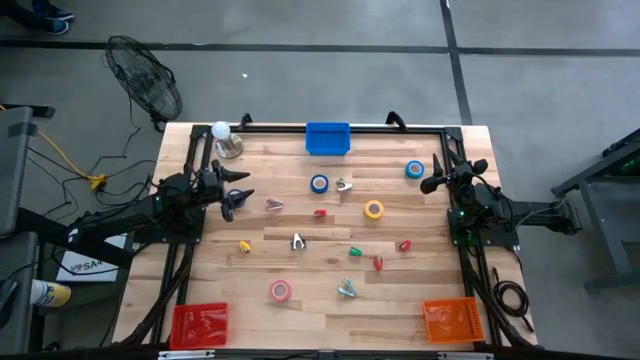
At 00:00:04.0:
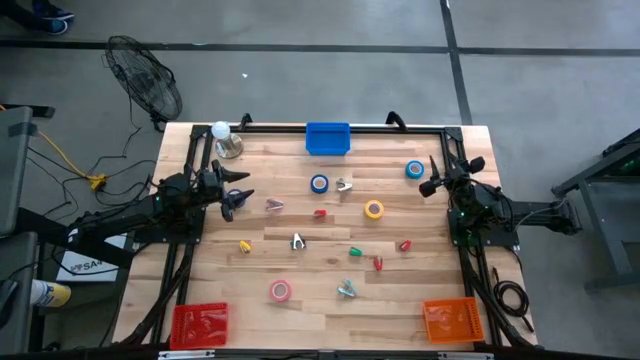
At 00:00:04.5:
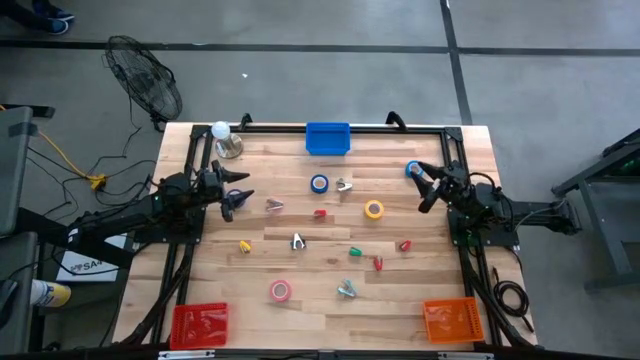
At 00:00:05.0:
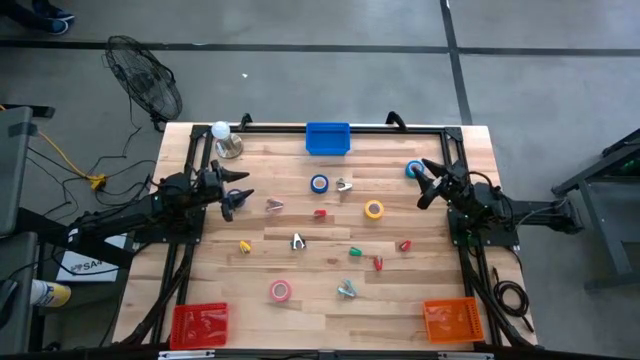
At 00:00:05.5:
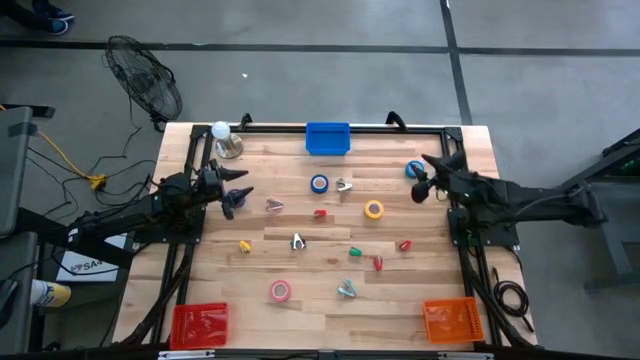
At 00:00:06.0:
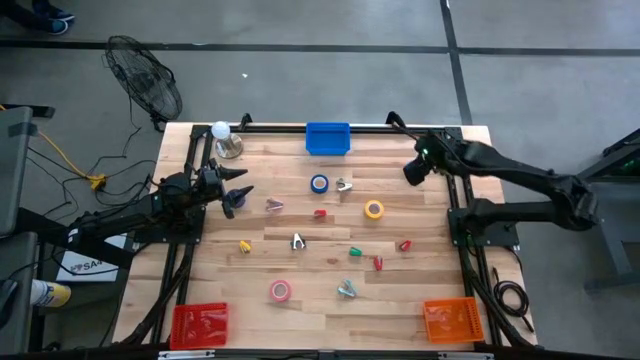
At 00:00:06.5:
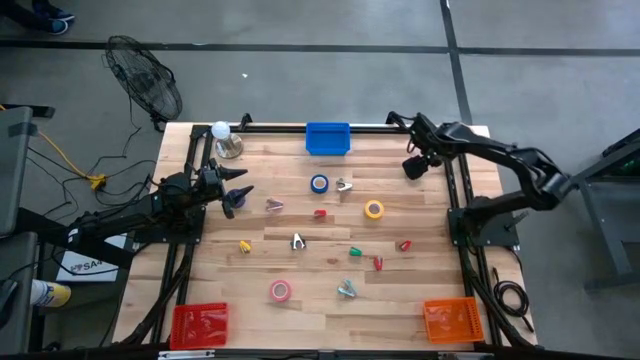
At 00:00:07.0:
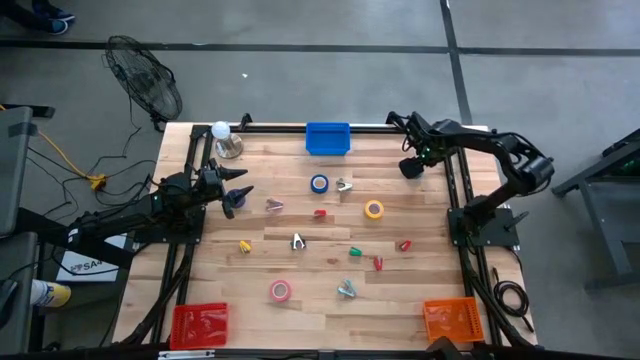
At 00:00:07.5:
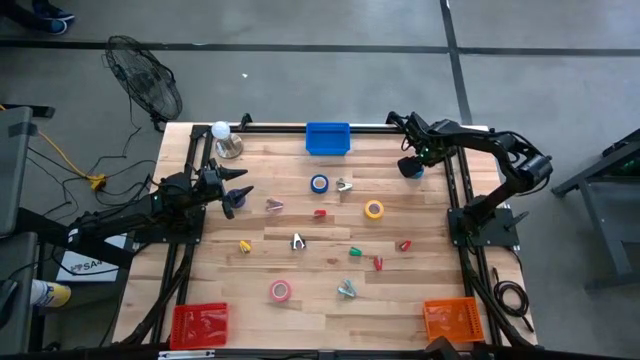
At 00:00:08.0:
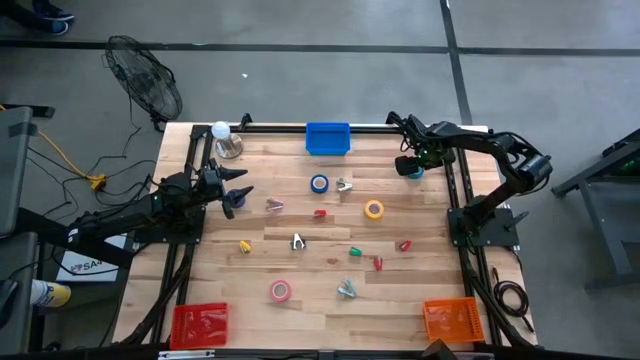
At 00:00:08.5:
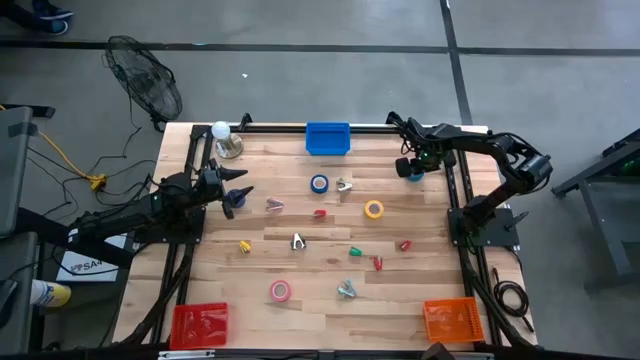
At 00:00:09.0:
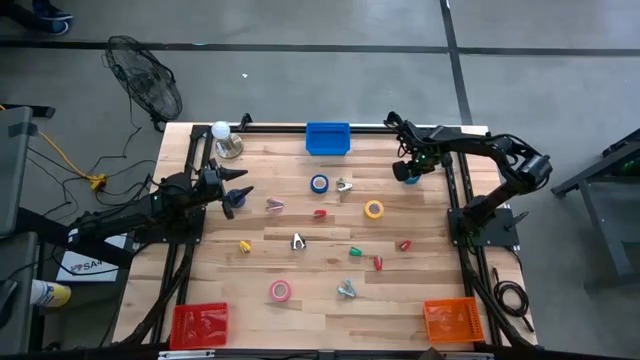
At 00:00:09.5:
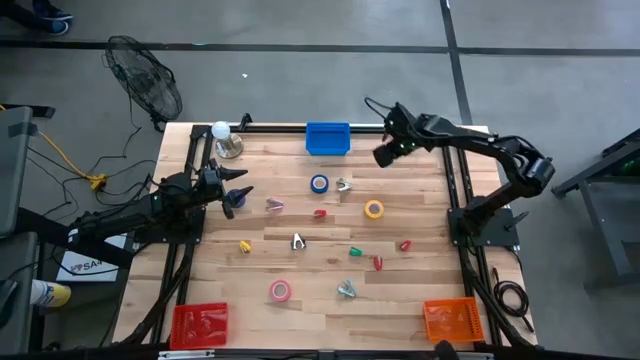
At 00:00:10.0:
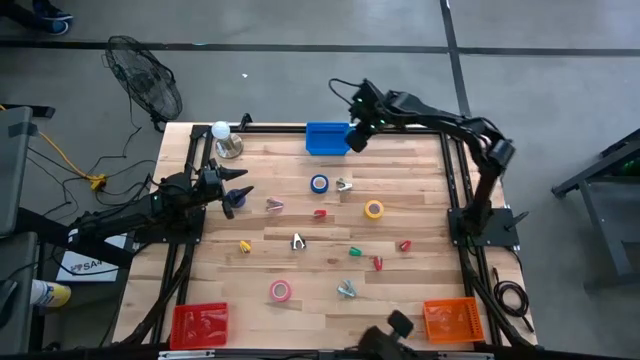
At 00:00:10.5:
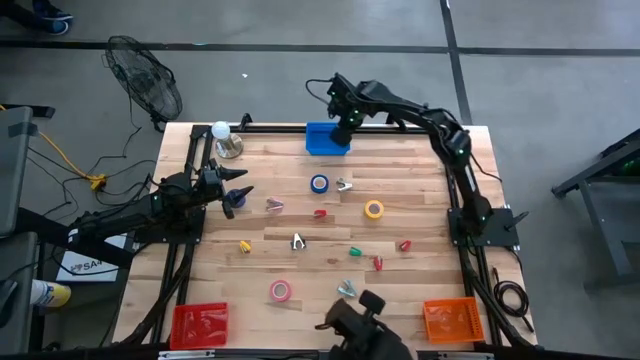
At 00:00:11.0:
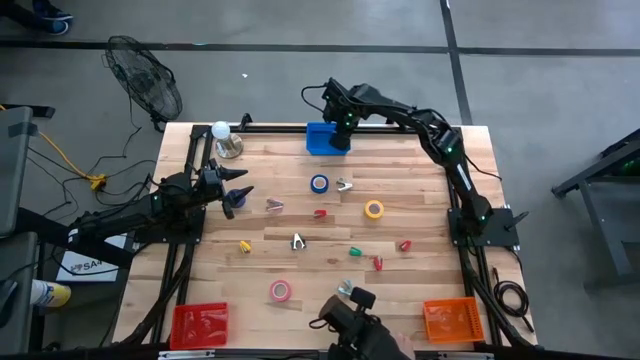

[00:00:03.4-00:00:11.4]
Task: Pick and place Stapler, Stapler remover, tape
Put the right blue tape into the blue bin

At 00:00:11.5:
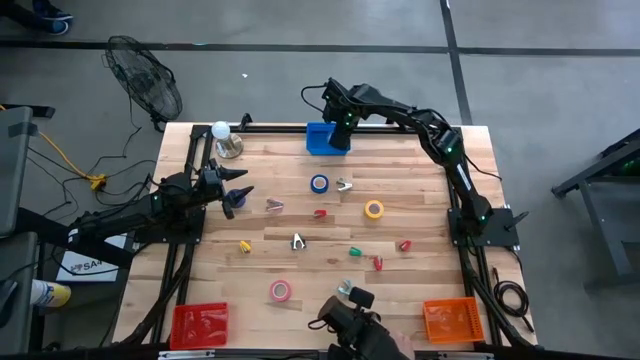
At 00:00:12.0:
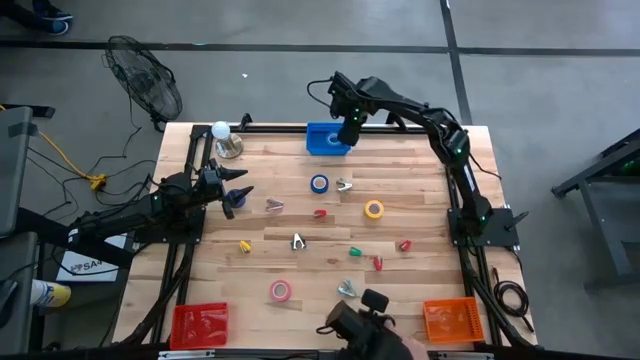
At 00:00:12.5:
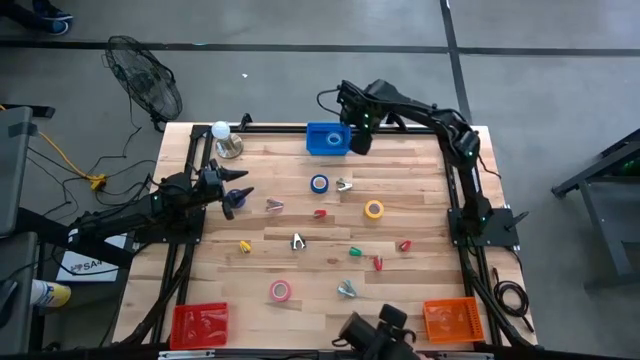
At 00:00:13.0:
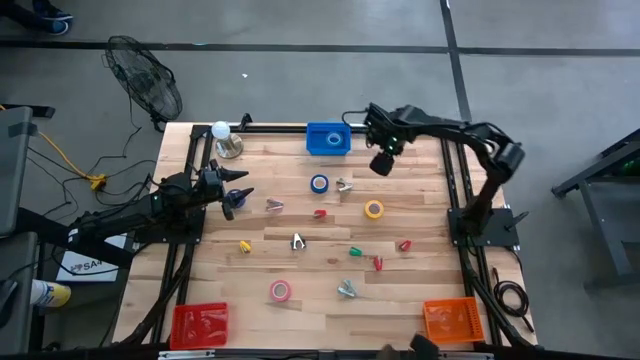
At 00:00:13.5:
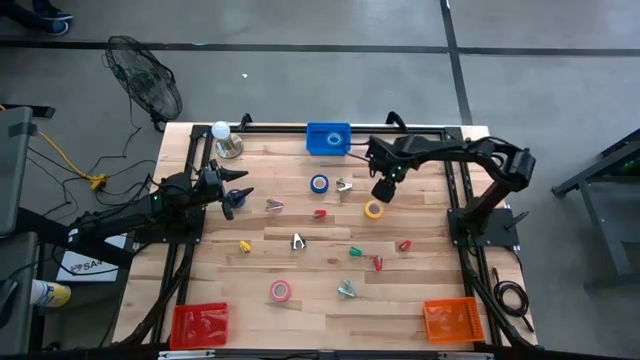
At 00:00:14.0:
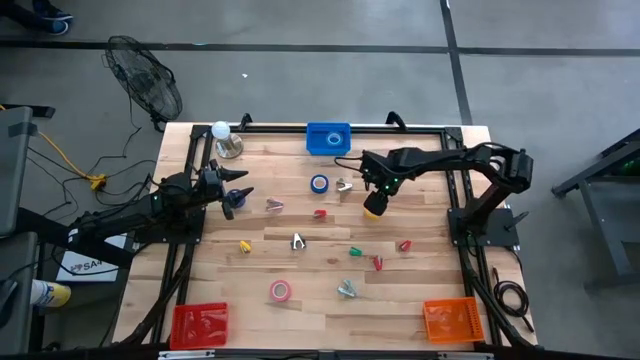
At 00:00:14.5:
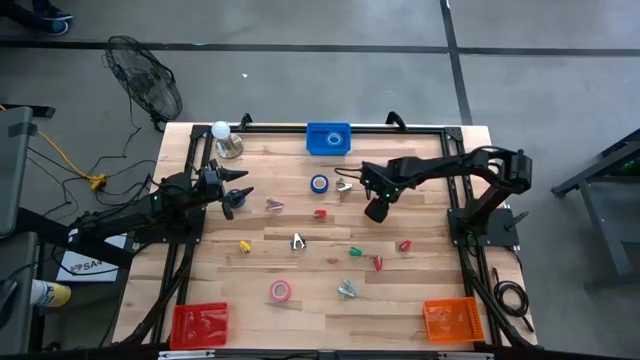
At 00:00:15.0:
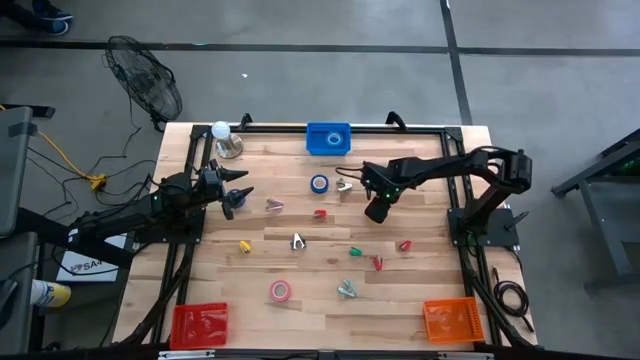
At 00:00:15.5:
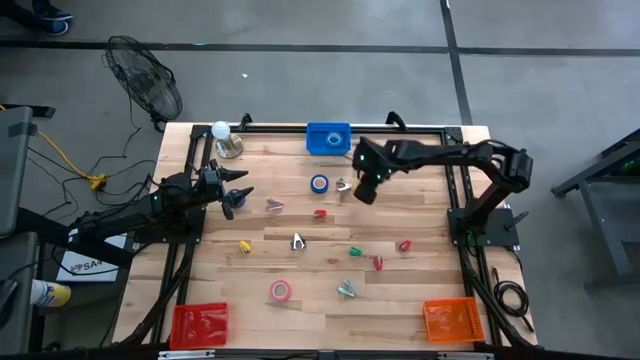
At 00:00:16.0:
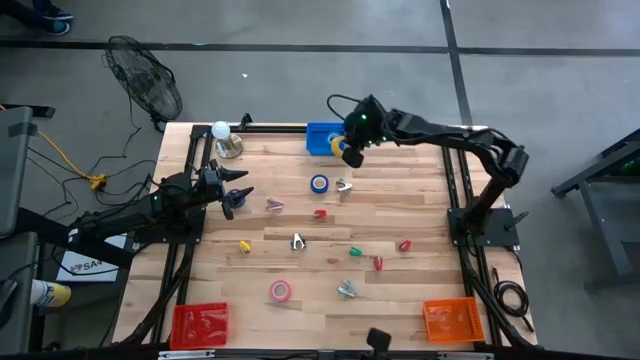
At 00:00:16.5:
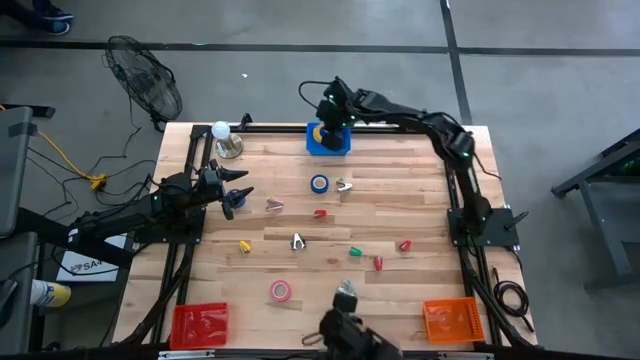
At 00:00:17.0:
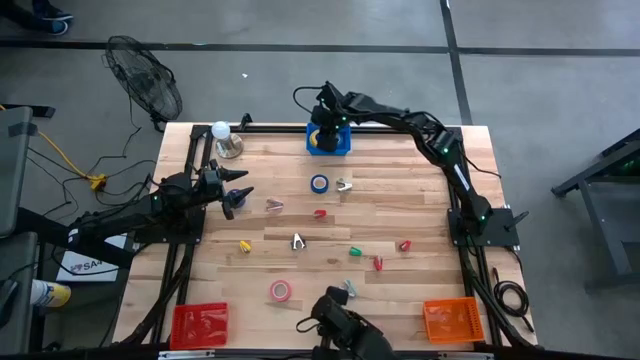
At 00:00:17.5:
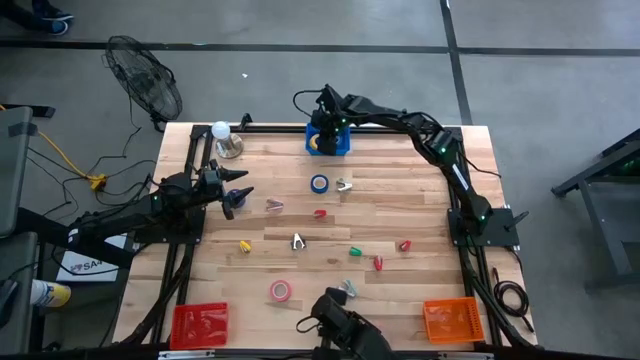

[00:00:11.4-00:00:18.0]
Put the yellow tape into the blue bin

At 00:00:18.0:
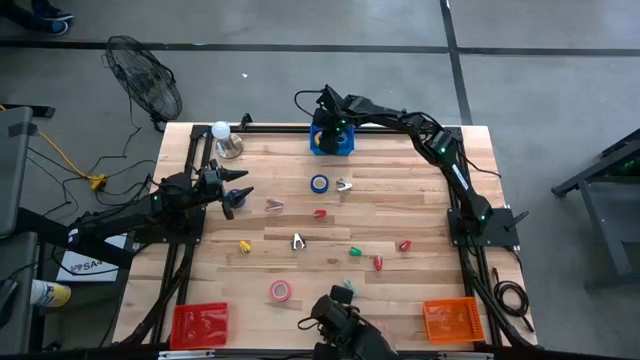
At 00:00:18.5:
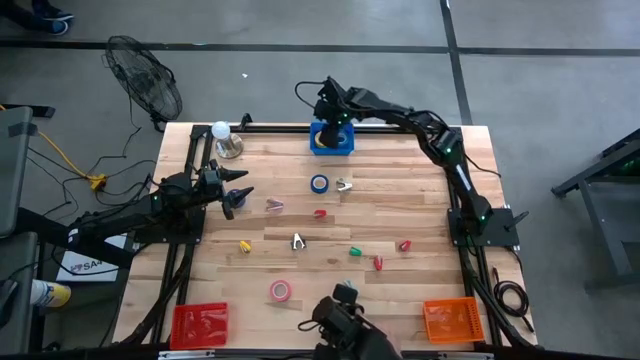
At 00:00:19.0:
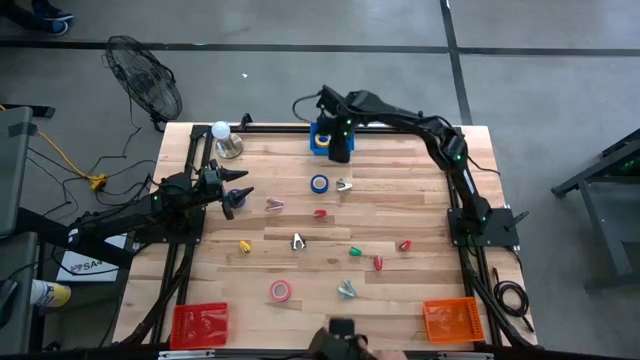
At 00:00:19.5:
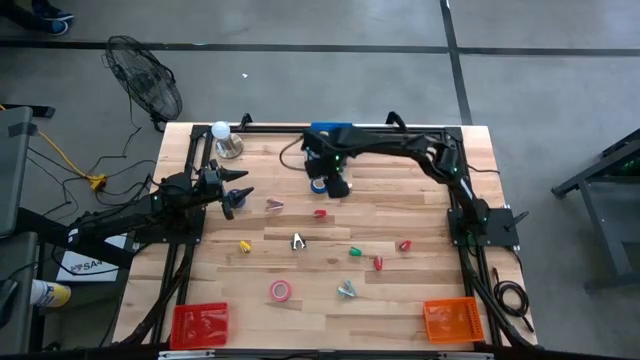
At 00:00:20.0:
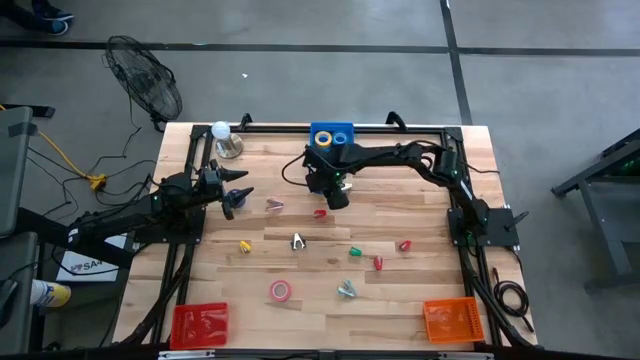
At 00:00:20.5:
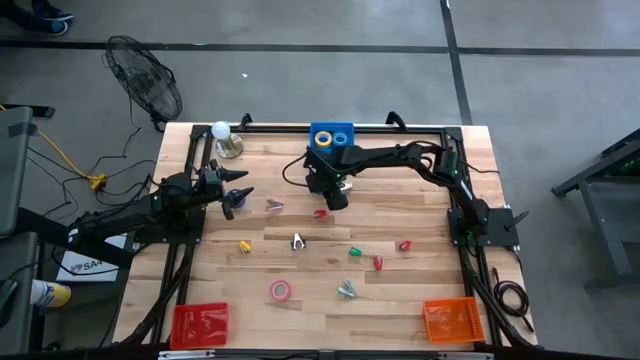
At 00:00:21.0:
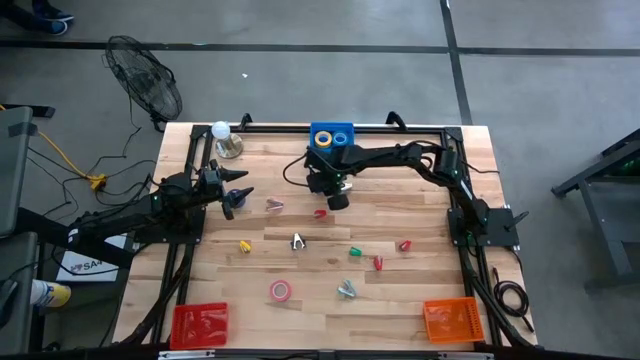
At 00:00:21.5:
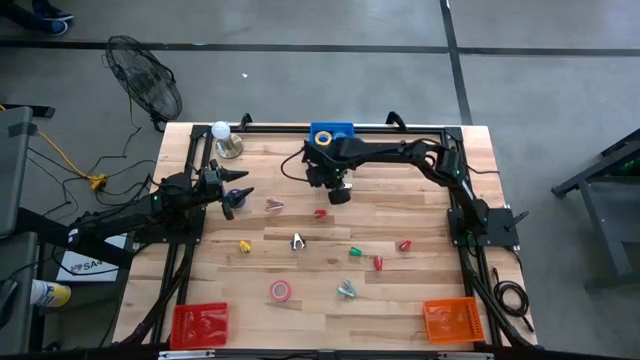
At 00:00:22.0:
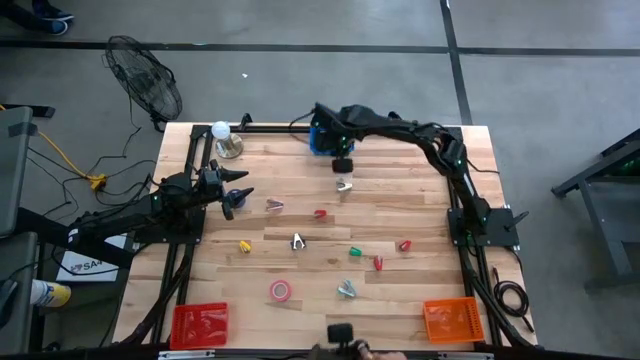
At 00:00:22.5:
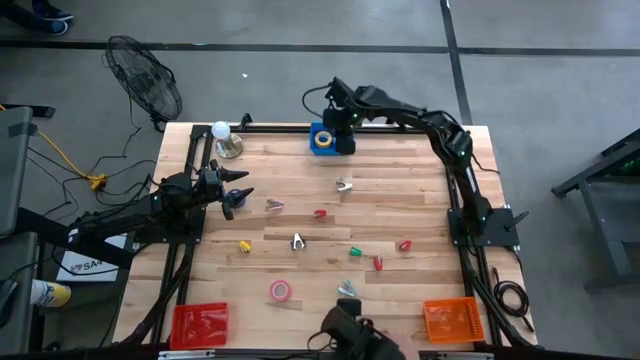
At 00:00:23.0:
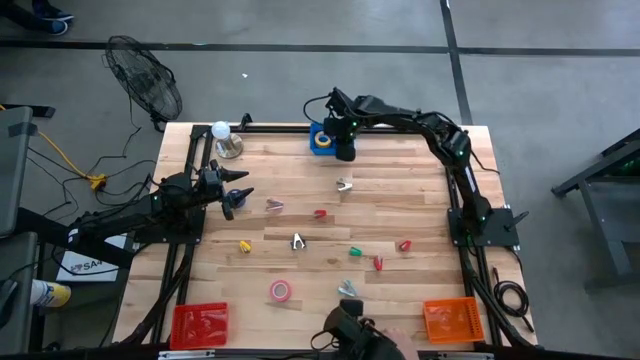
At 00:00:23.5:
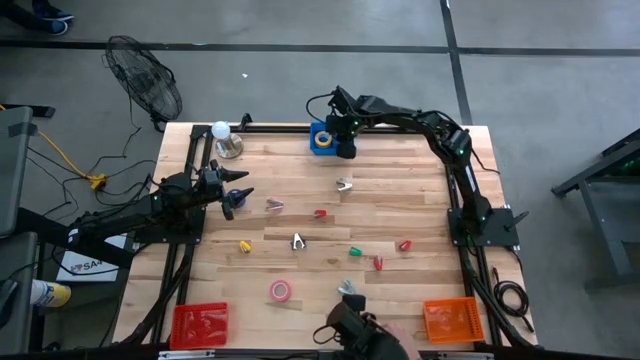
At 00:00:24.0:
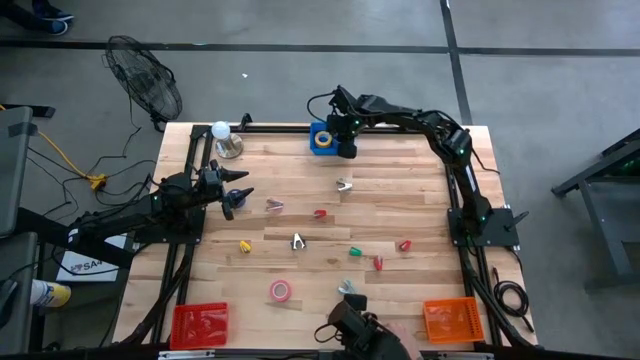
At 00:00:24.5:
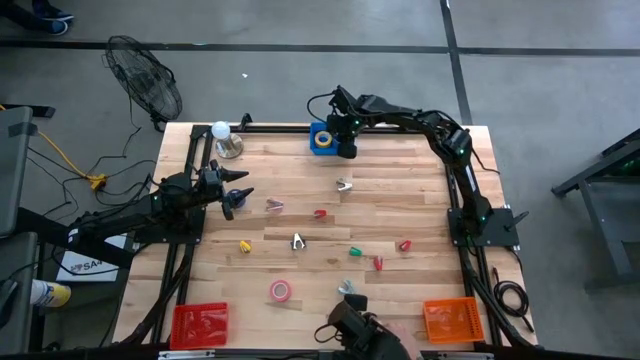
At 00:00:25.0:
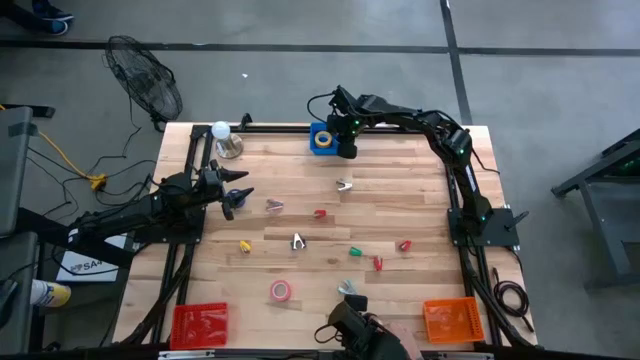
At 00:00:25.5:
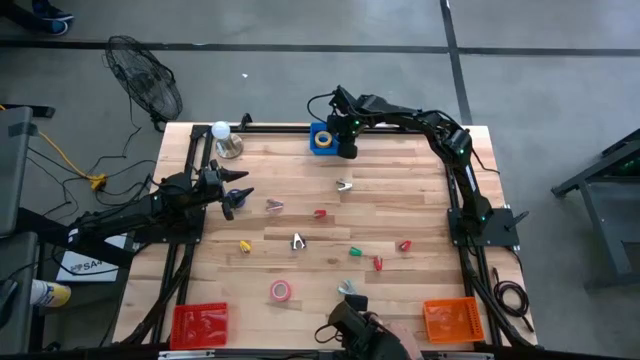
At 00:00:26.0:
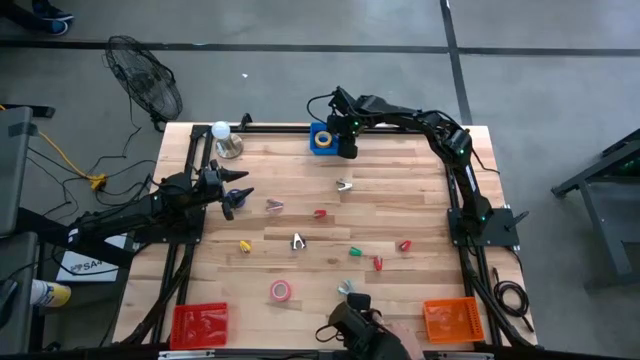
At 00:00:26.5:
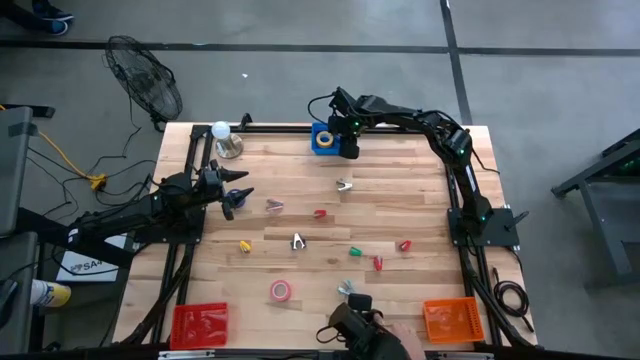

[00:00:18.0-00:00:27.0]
Put the right blue tape into the blue bin
